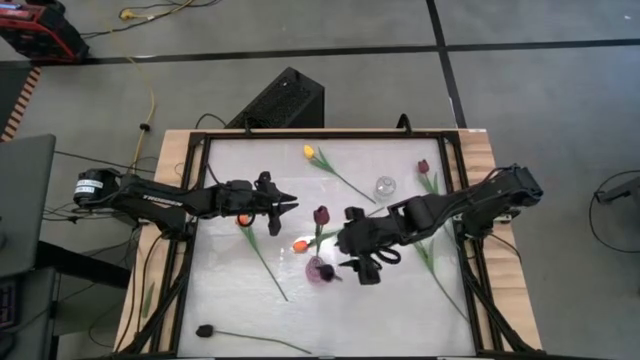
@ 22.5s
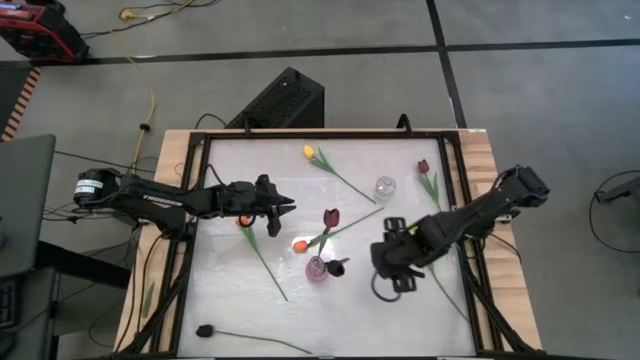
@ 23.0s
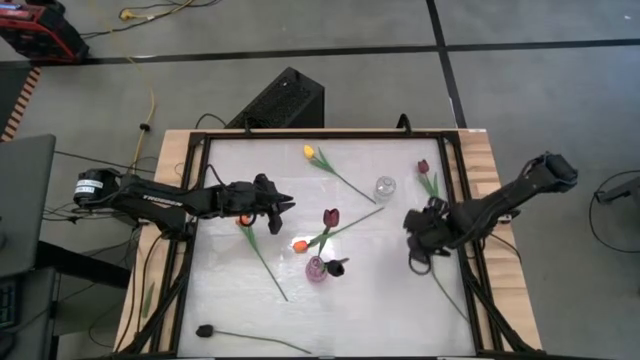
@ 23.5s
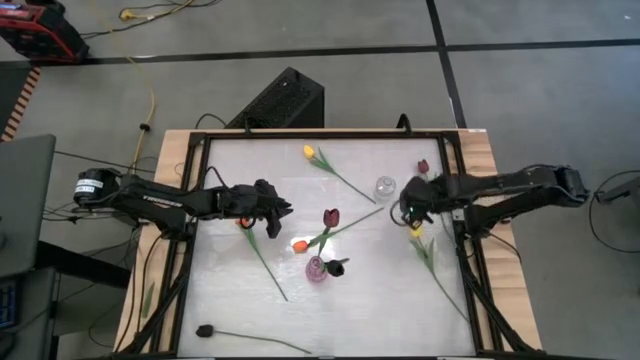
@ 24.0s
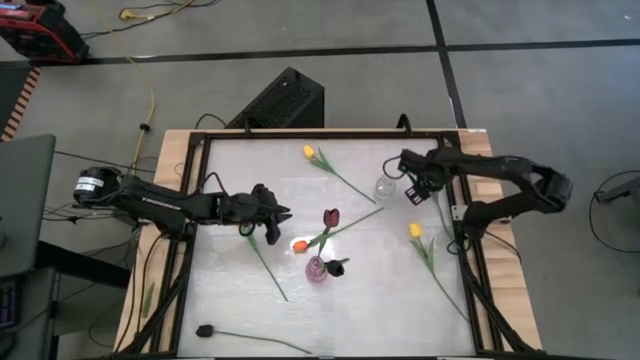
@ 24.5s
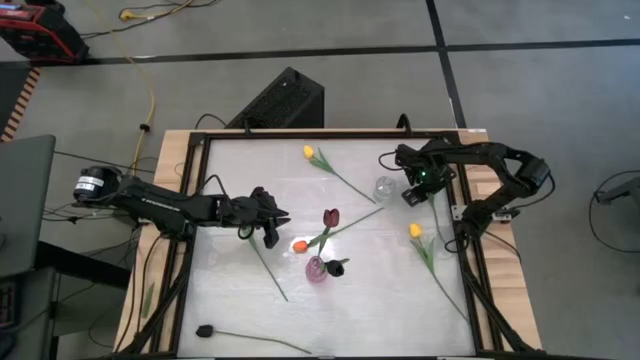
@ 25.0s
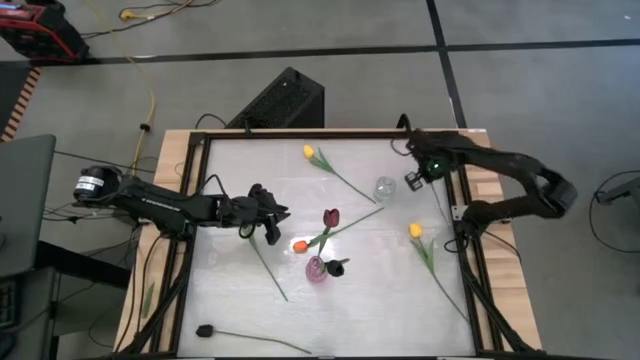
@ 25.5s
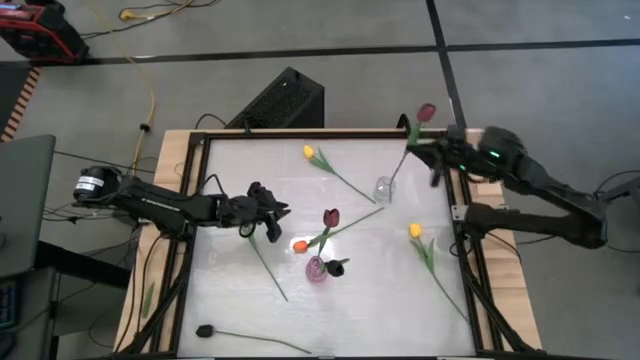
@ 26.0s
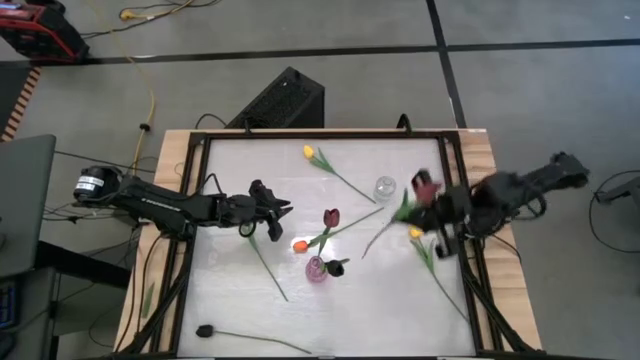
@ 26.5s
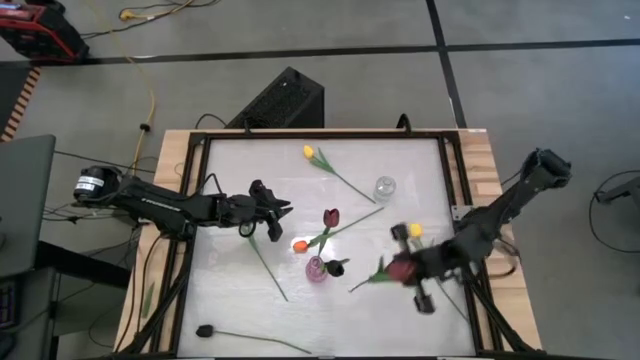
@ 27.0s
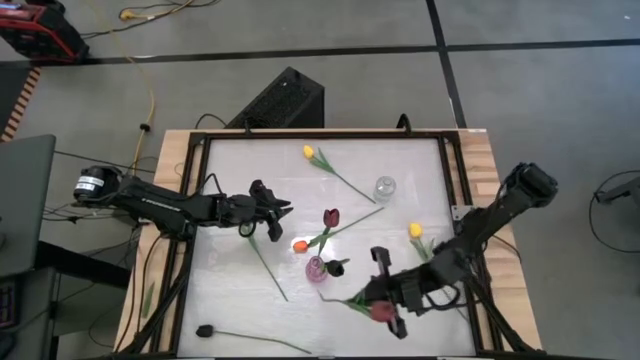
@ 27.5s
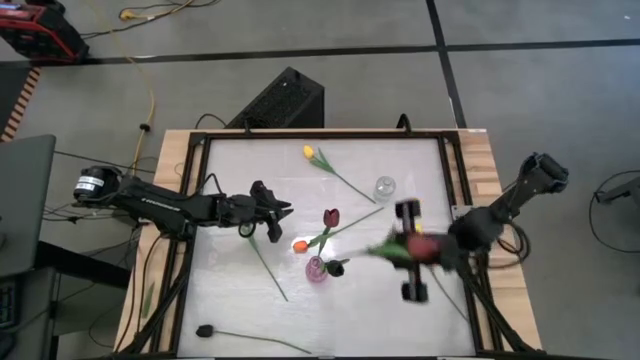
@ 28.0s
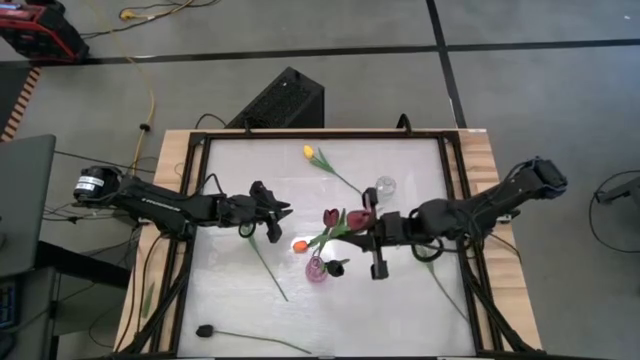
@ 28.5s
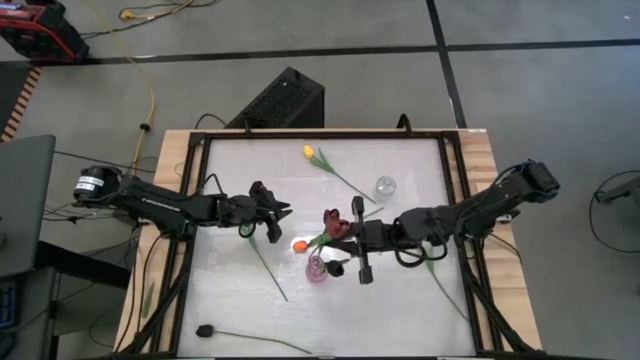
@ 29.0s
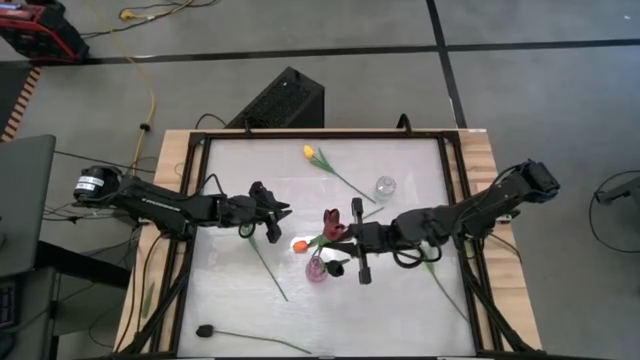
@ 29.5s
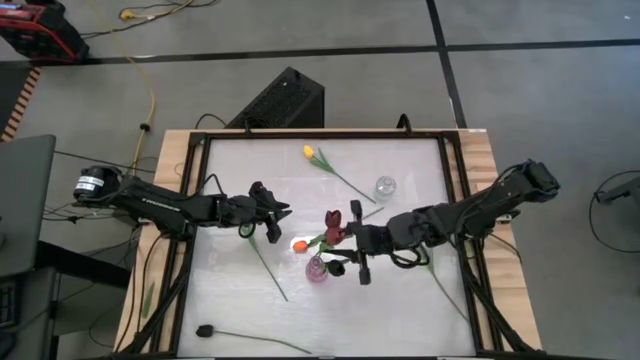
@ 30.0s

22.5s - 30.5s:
Task: Sort flowers into vase by color
Put the red flower into the violet vase

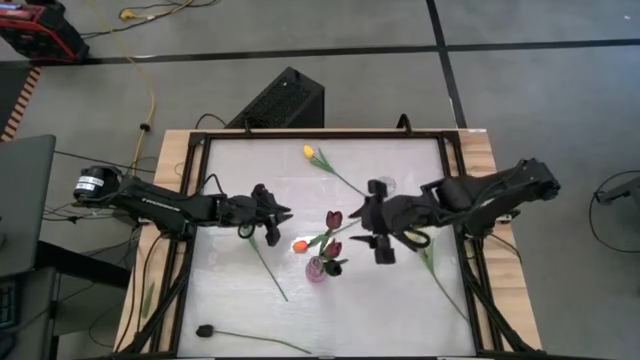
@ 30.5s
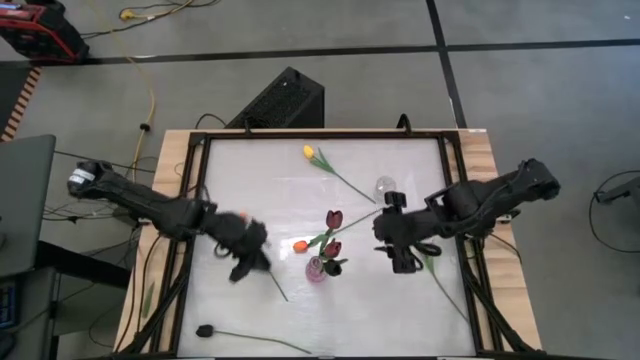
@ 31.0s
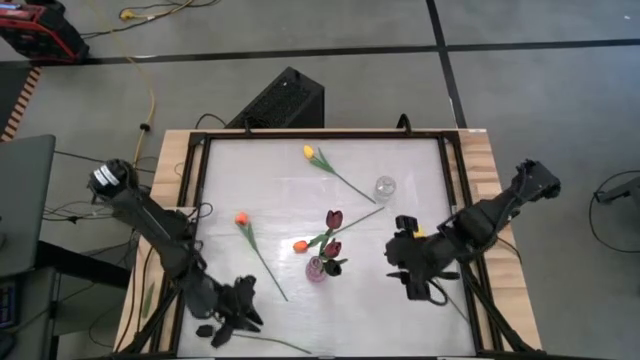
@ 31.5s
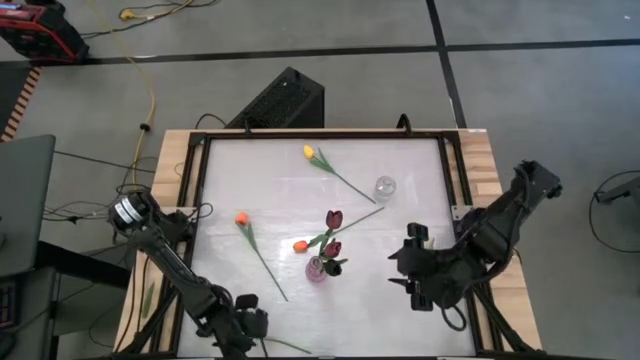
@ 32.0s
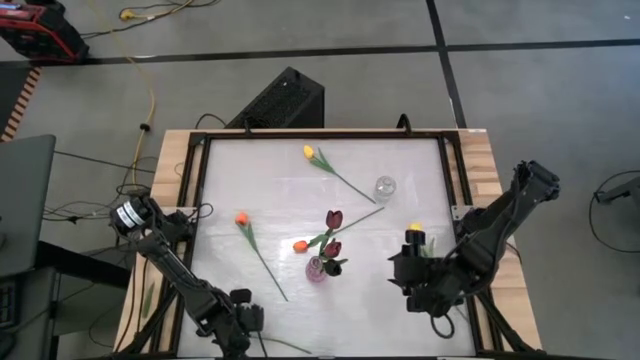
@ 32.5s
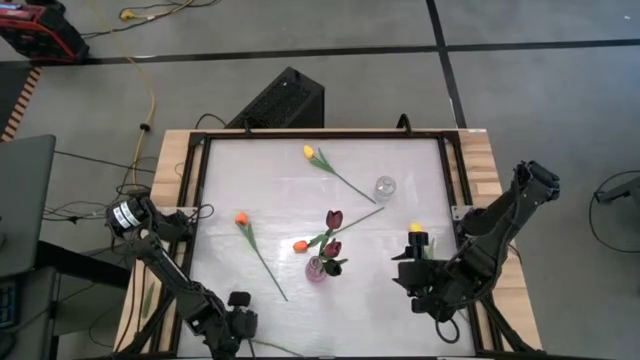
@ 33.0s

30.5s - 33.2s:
Put the black flower into the violet vase

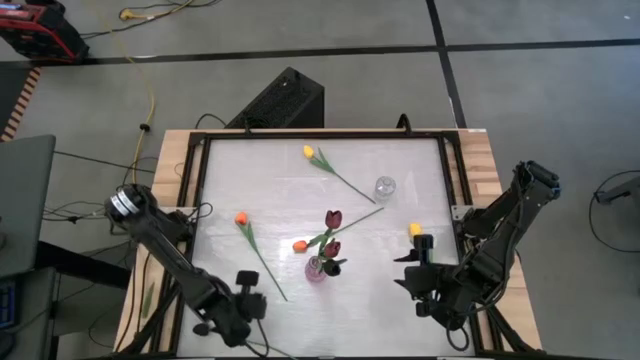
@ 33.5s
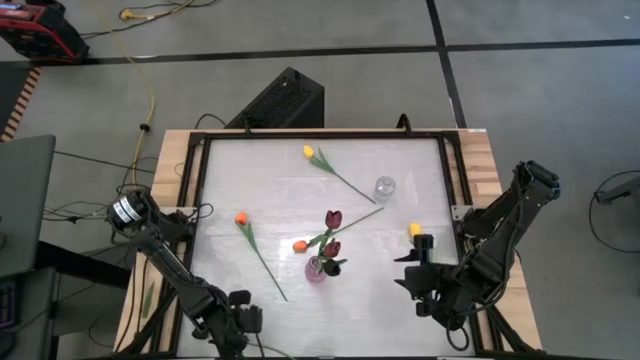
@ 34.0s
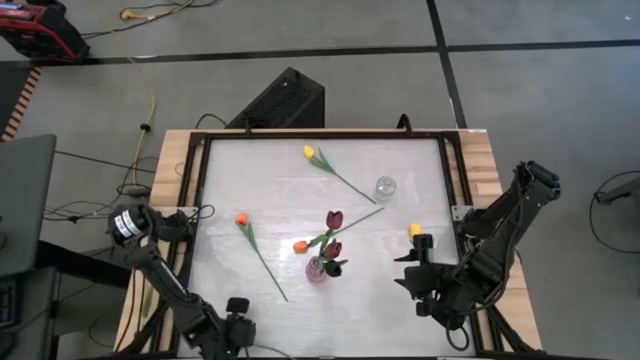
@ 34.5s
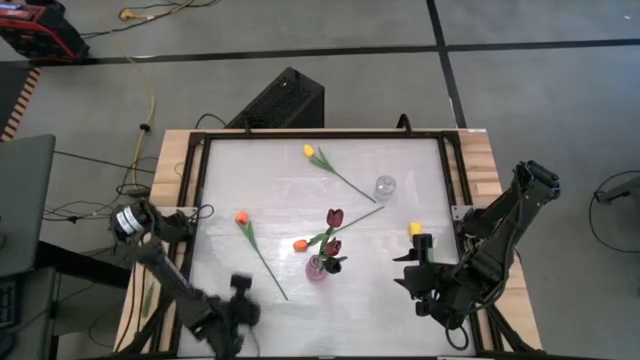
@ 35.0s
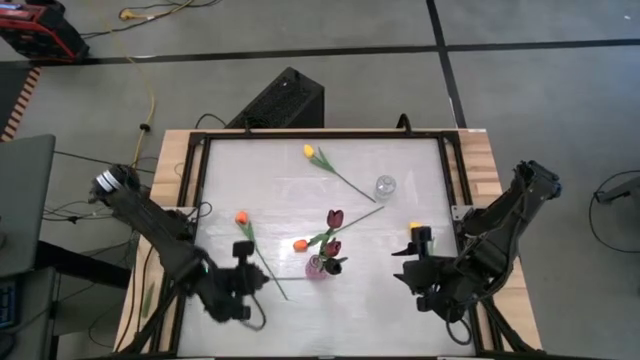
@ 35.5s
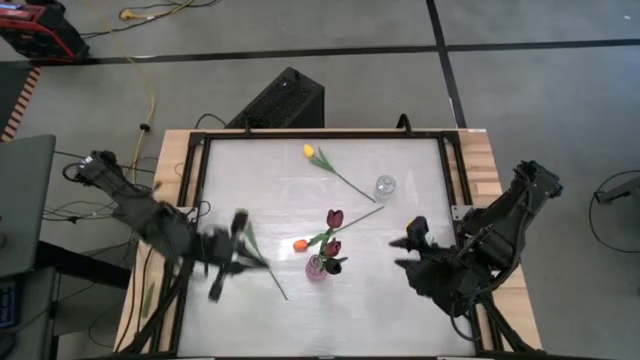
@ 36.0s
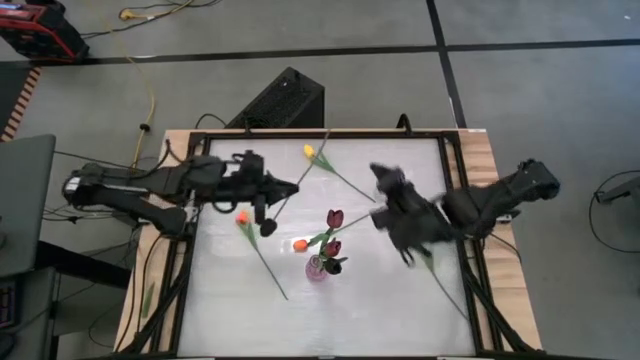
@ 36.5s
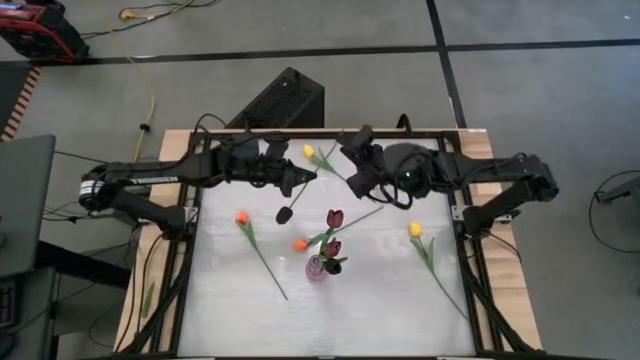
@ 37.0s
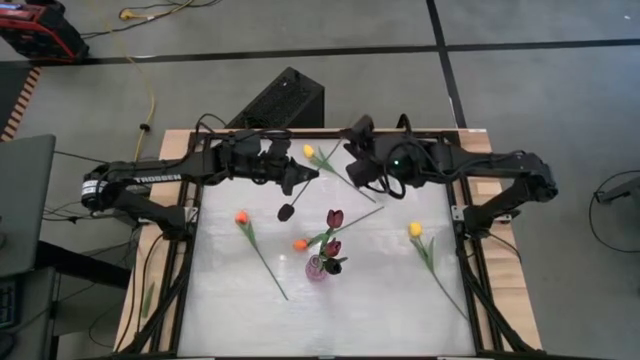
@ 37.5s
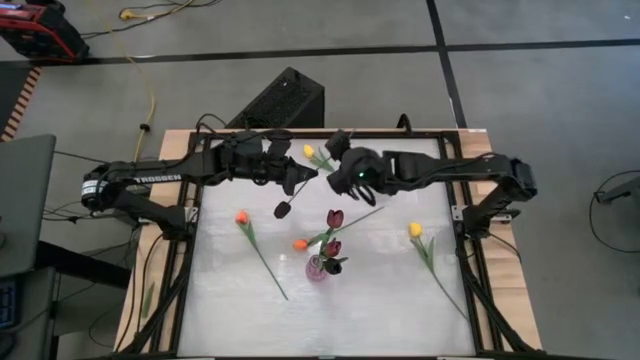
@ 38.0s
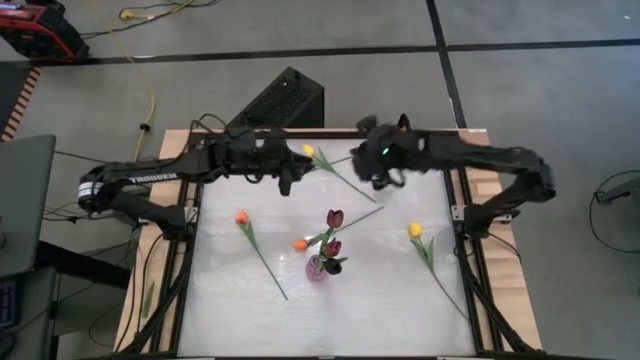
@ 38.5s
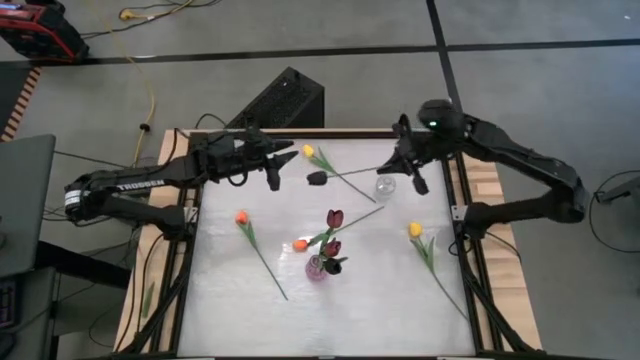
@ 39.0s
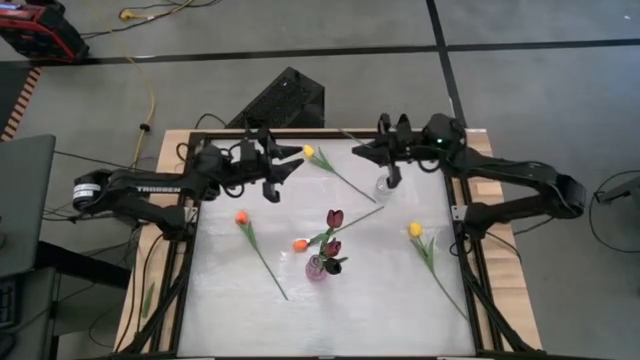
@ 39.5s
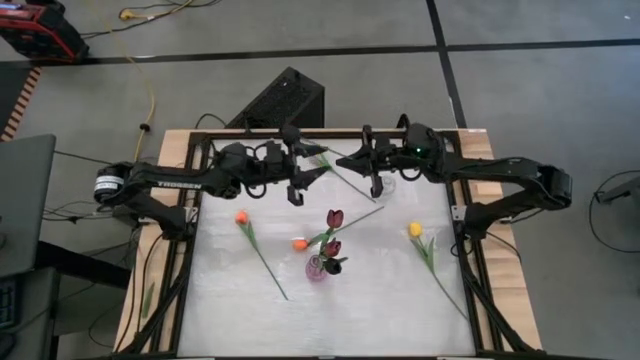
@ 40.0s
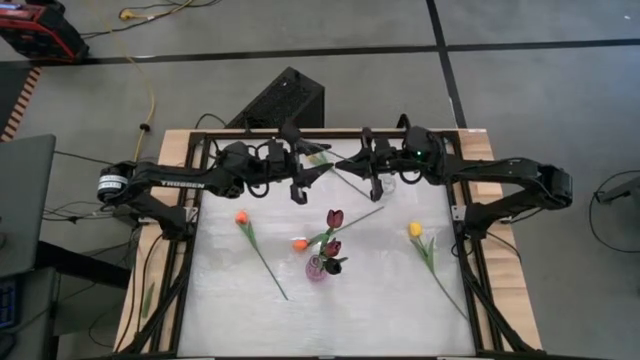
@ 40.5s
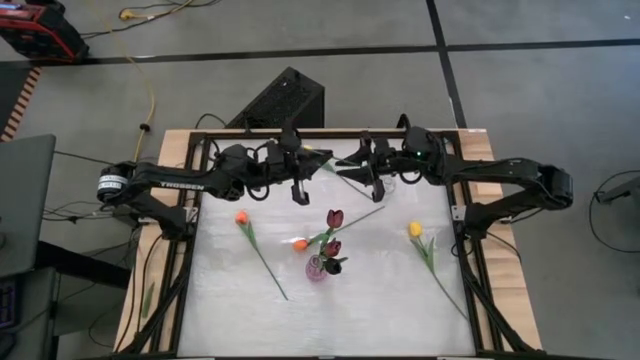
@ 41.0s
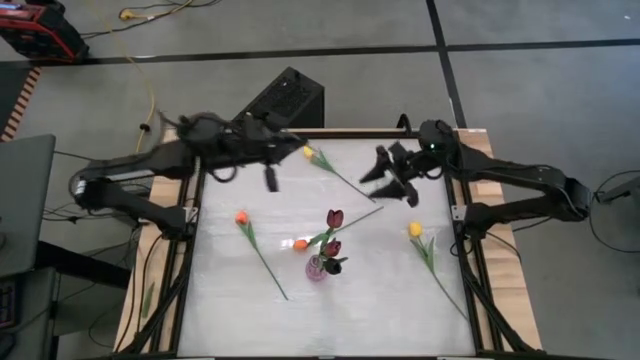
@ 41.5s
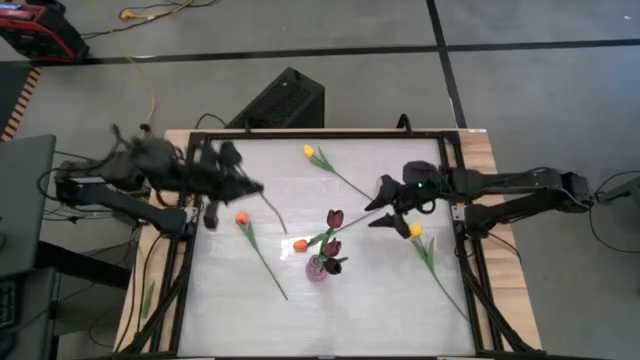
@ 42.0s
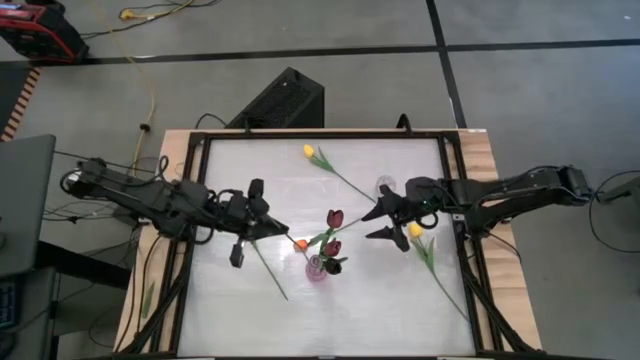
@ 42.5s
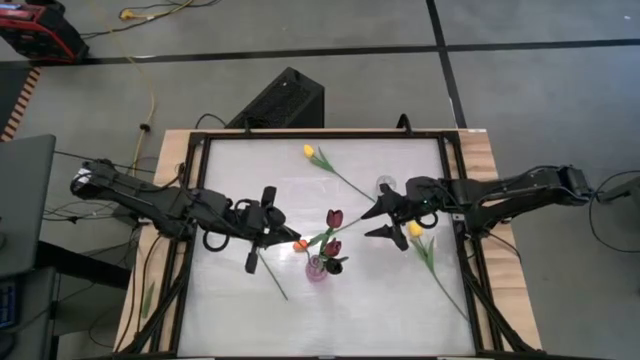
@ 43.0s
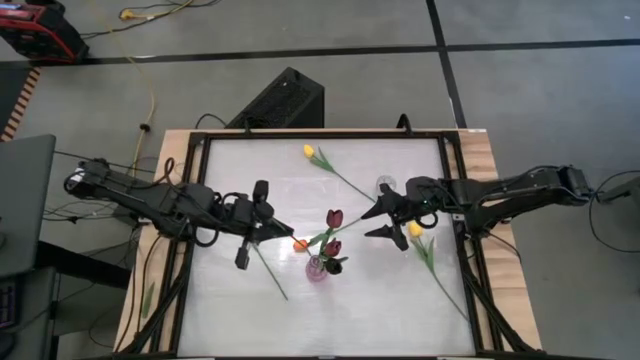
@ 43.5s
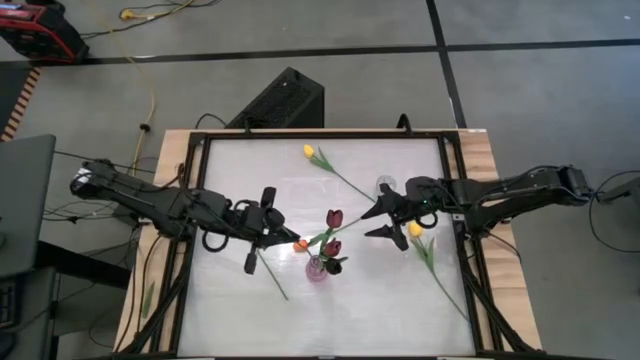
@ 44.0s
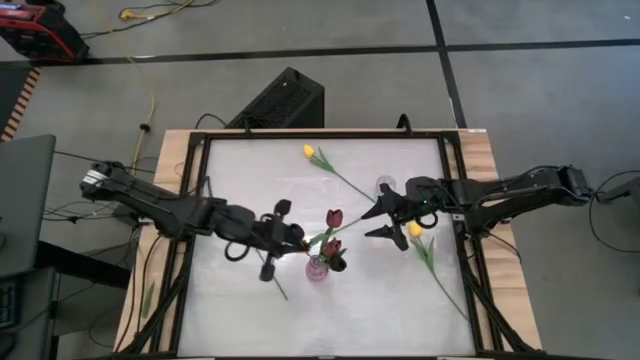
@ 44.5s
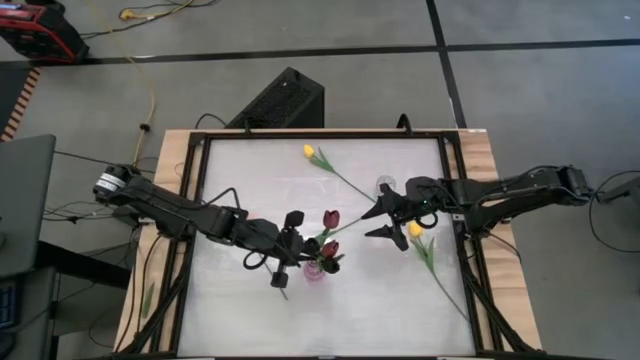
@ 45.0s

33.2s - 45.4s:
Put the black flower into the violet vase
